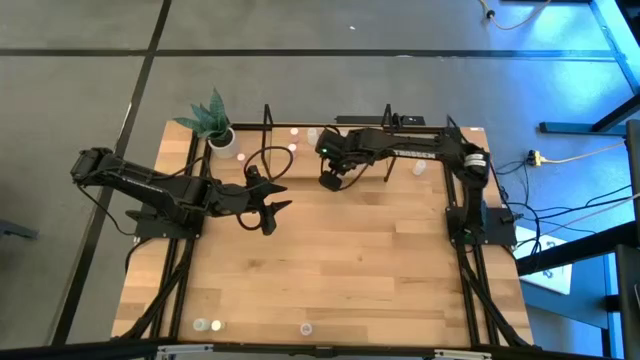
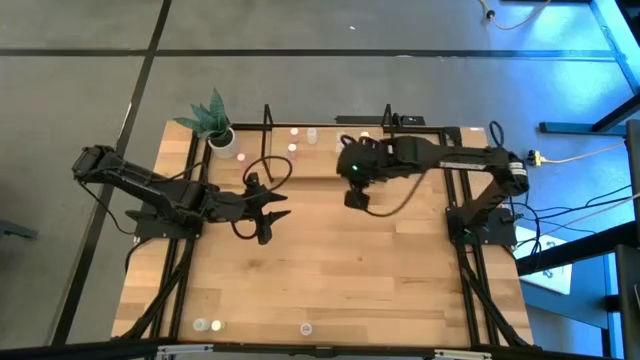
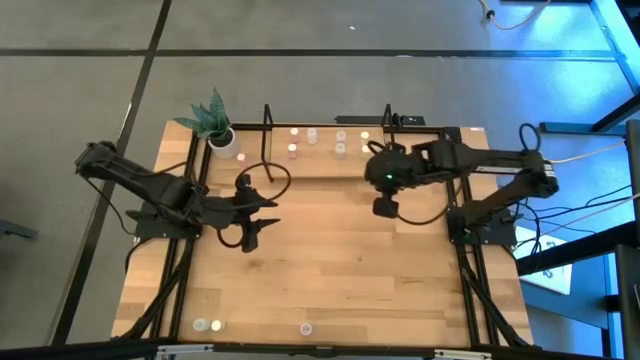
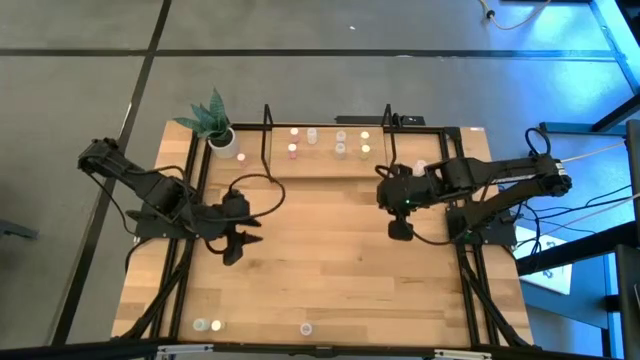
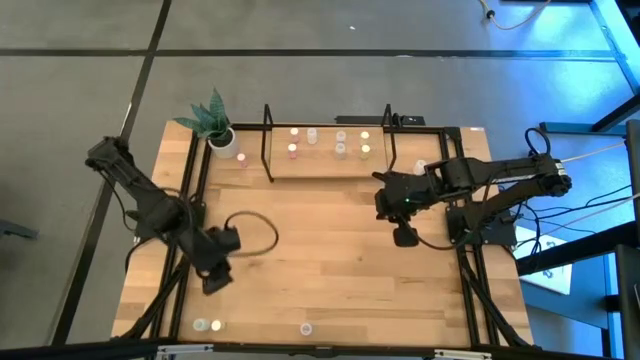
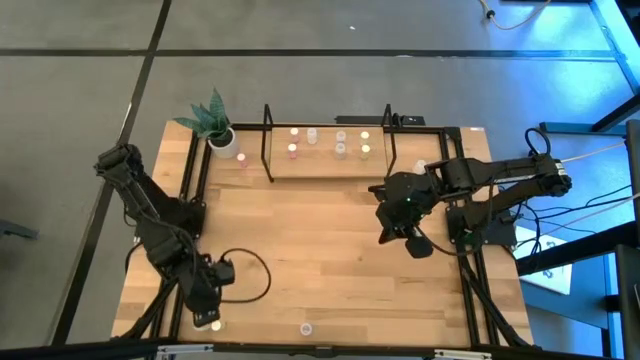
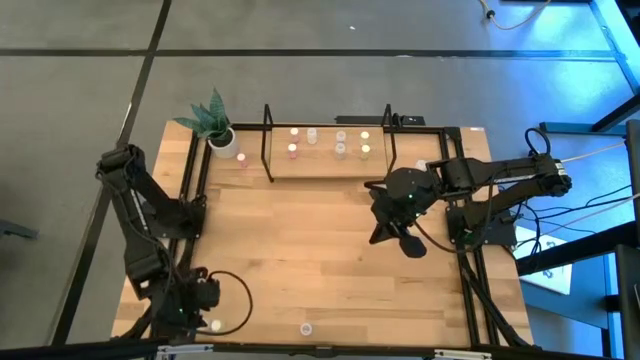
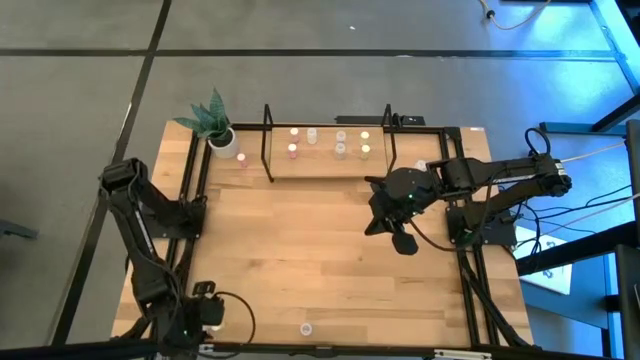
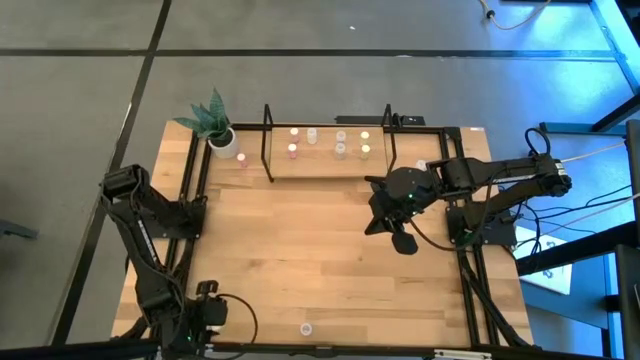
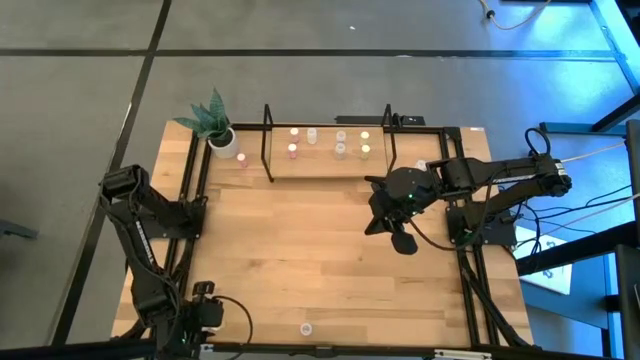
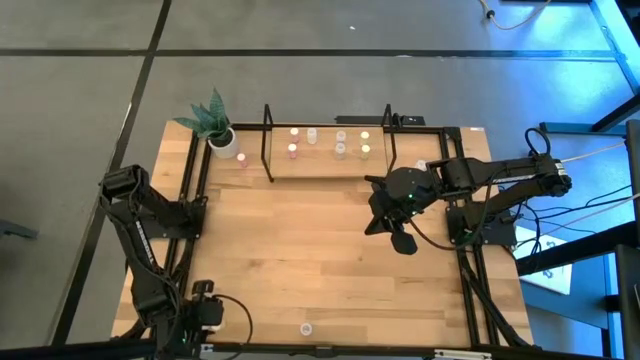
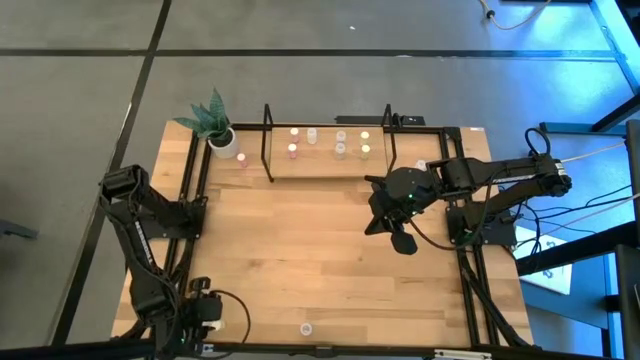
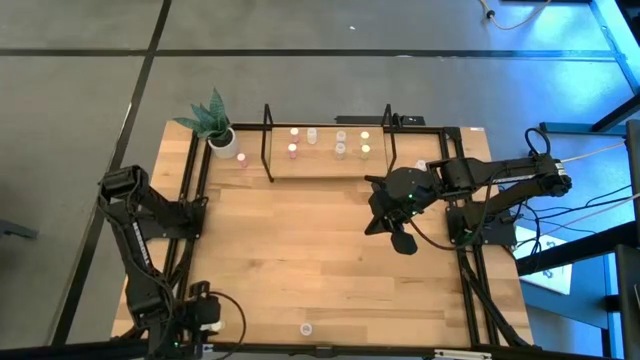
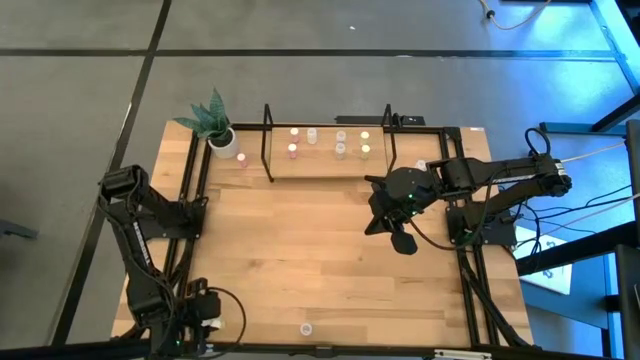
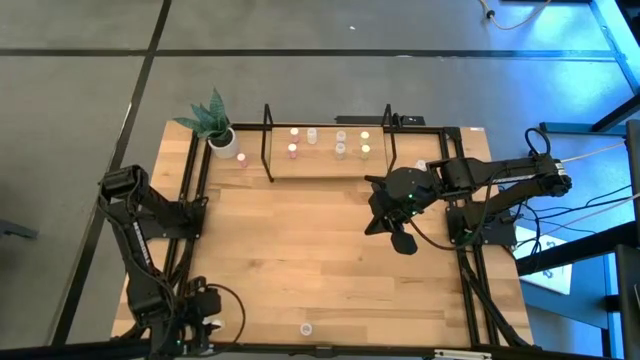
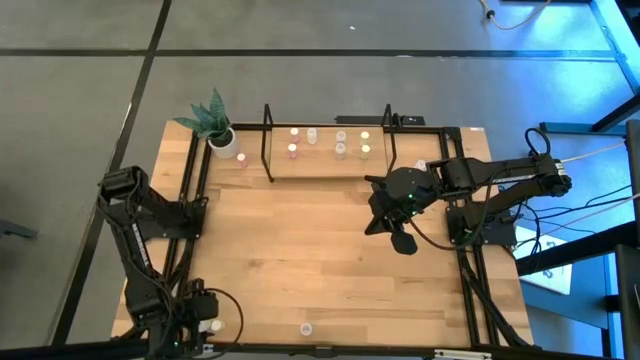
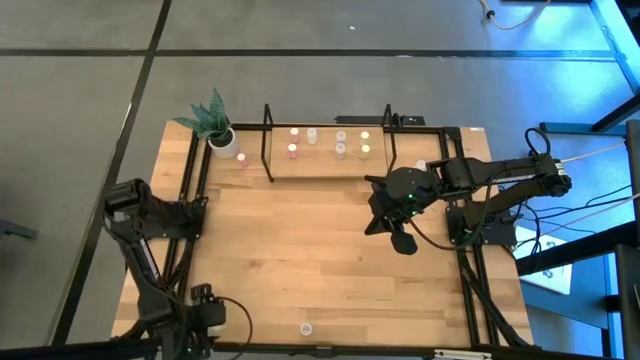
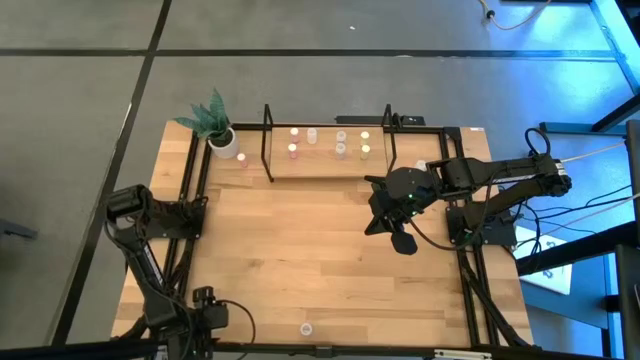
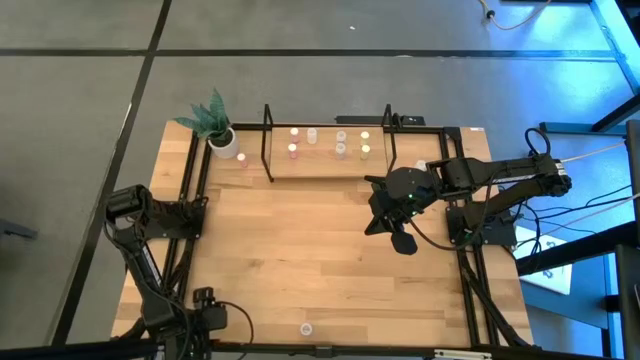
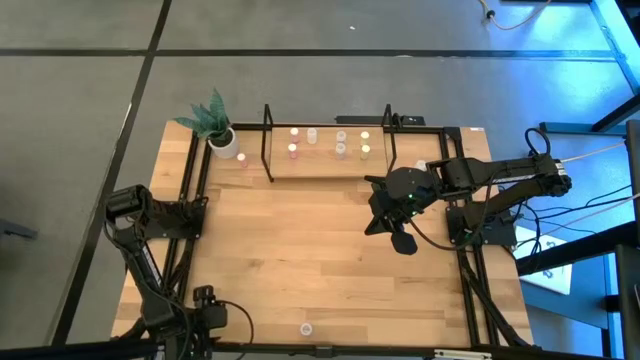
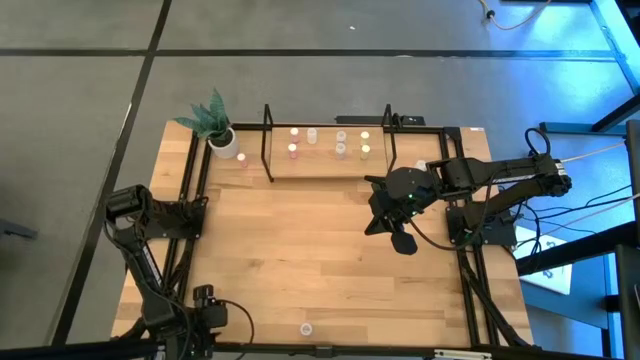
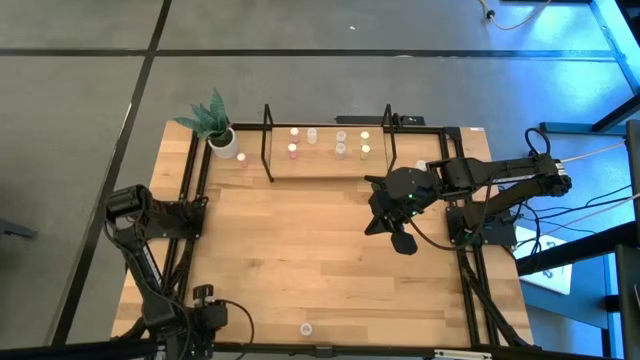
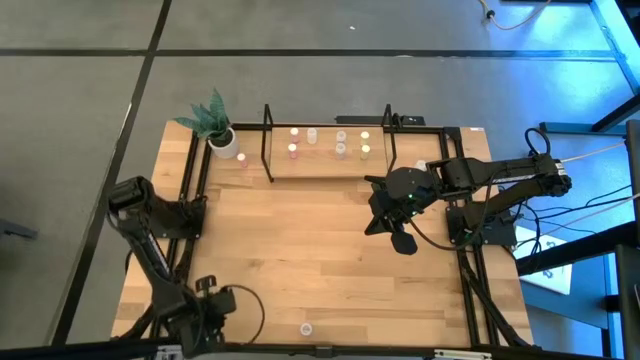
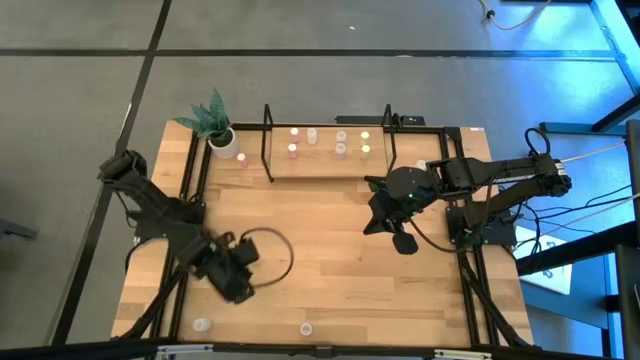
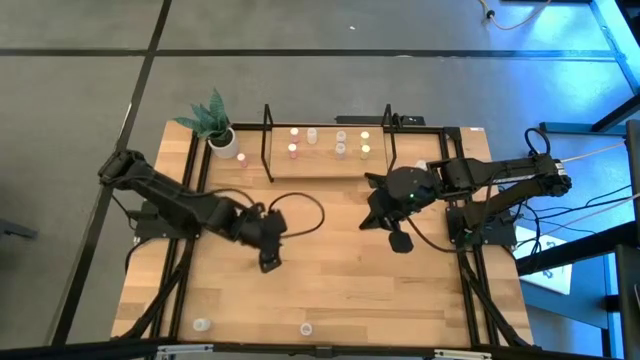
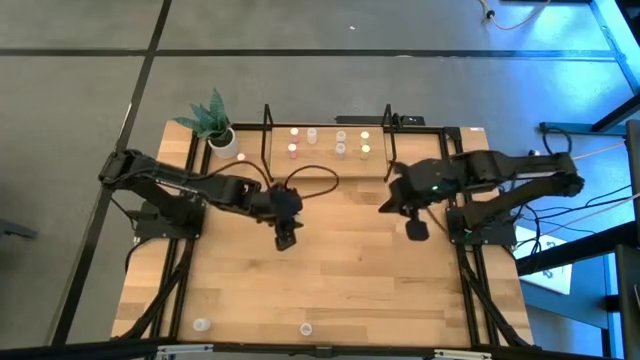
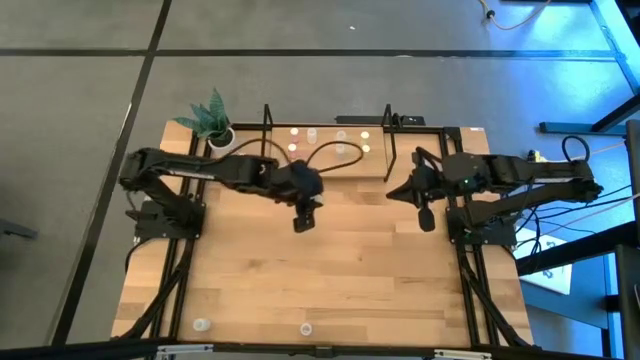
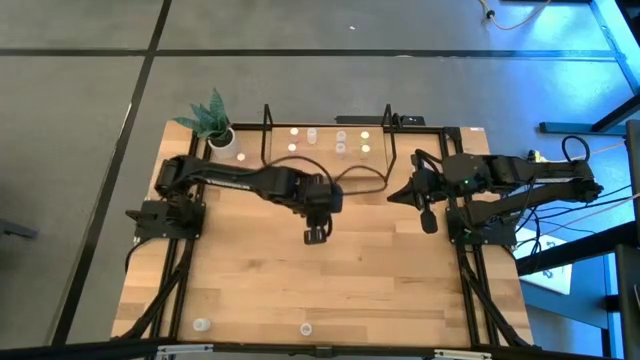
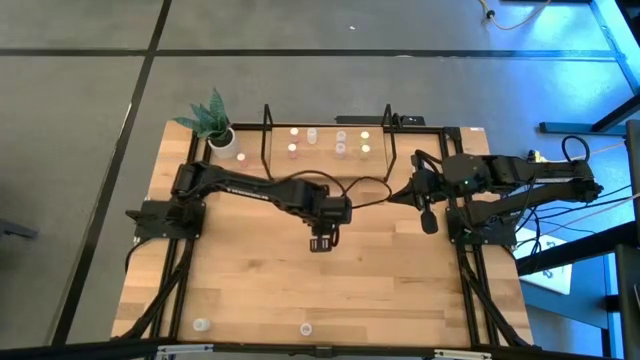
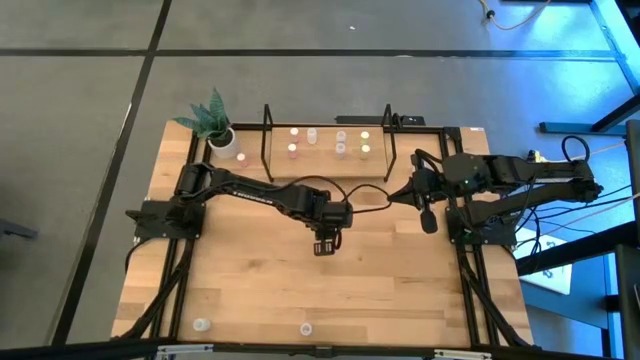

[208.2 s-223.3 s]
Task: Pick and place medicine bottles onto shelf by color
Put the yellow pill bottle on the shelf aligned with the other yellow pill bottles

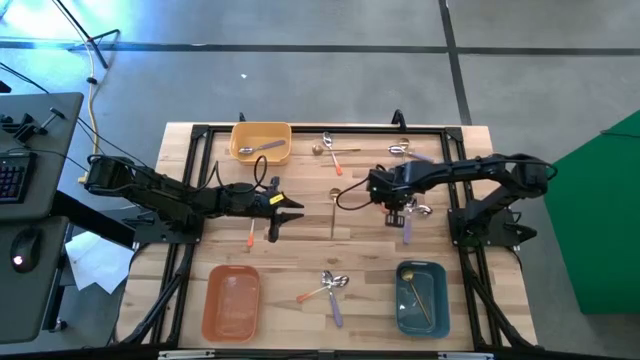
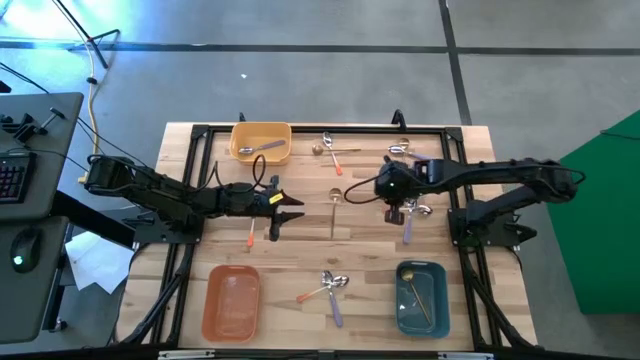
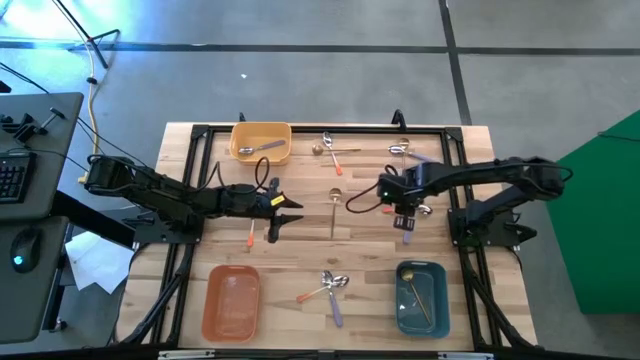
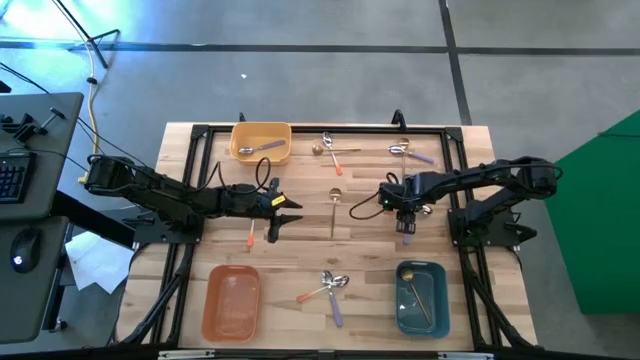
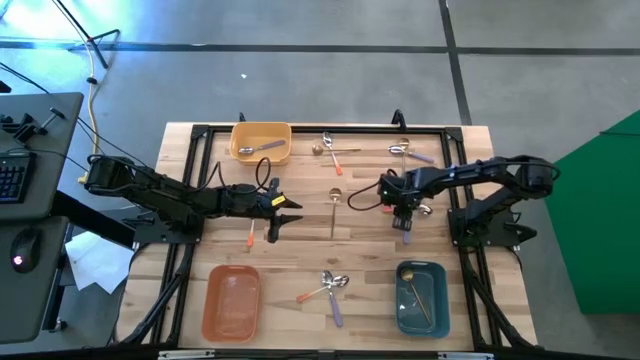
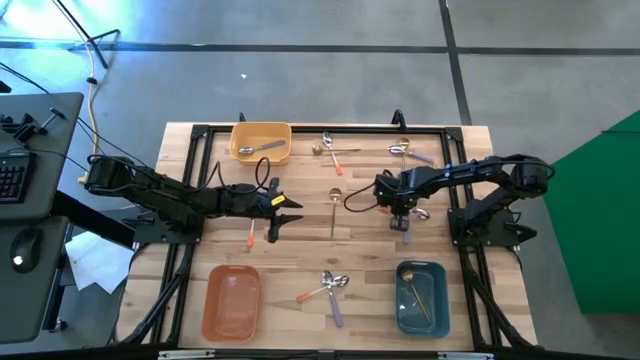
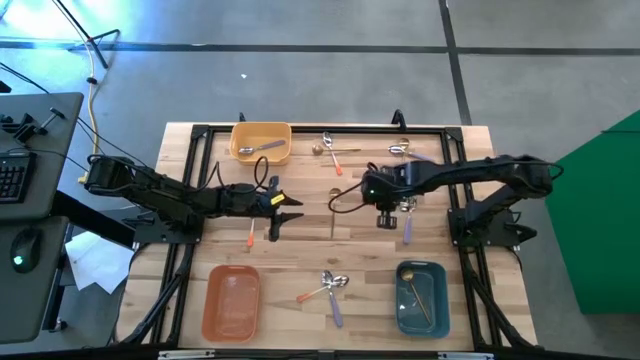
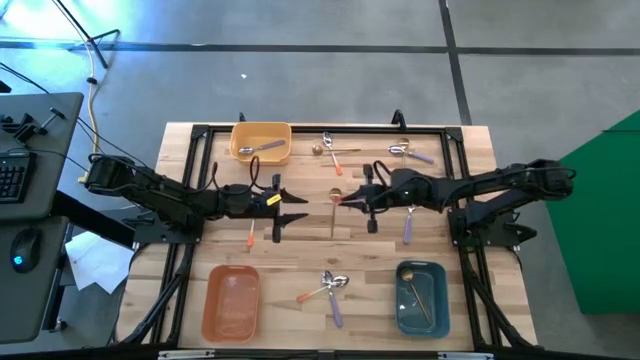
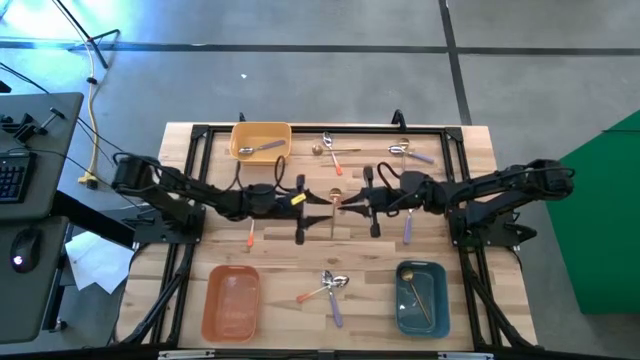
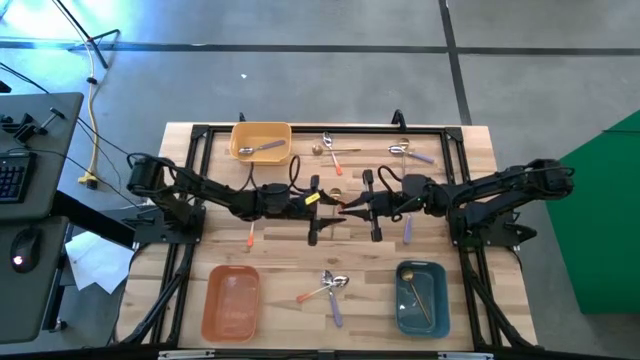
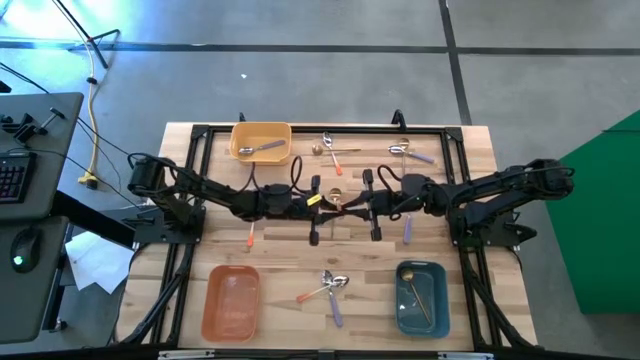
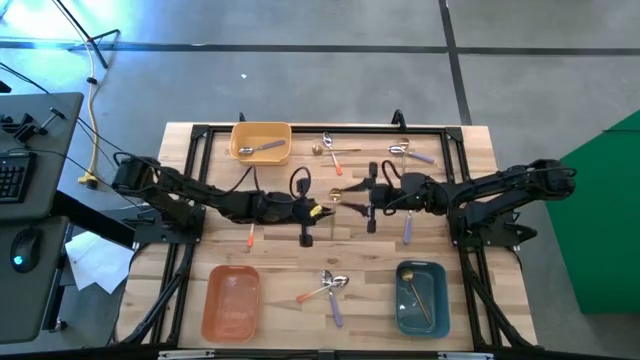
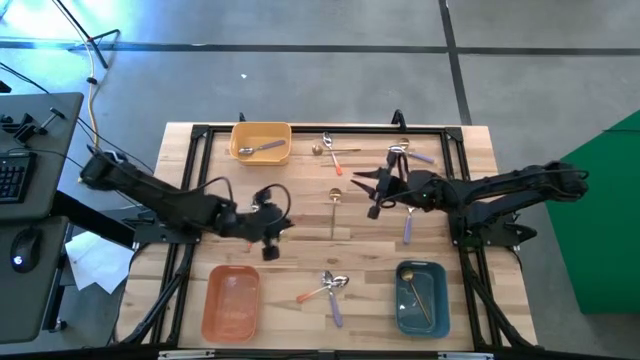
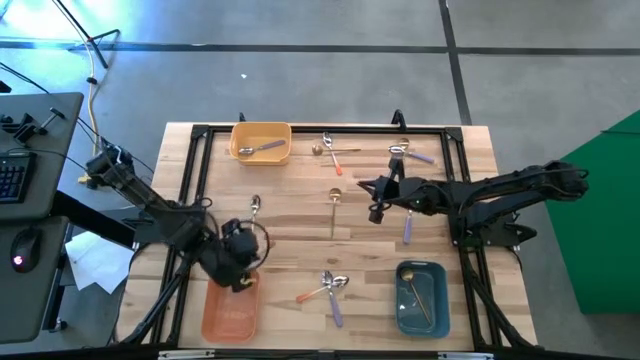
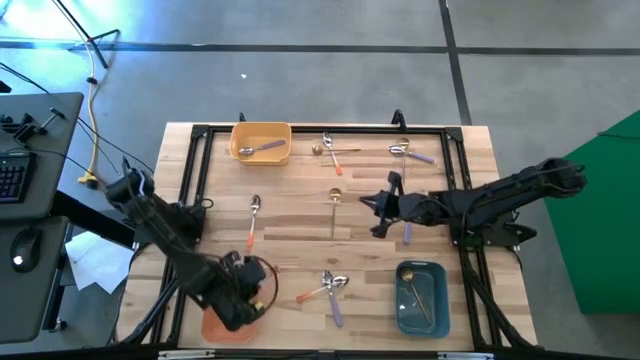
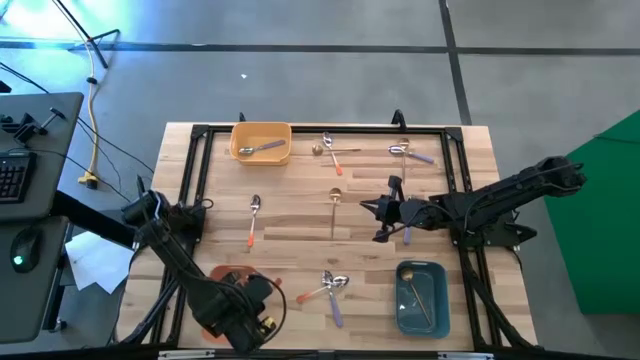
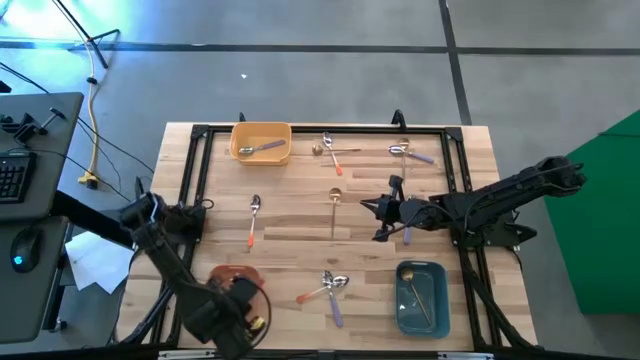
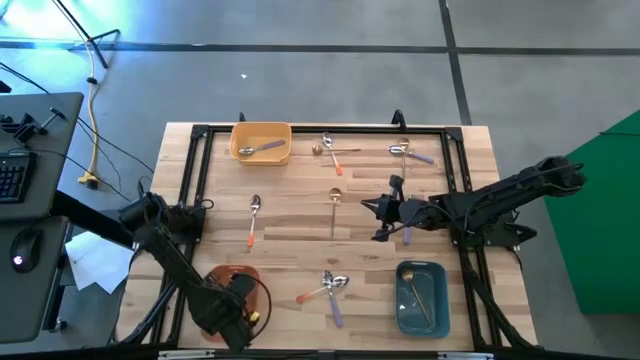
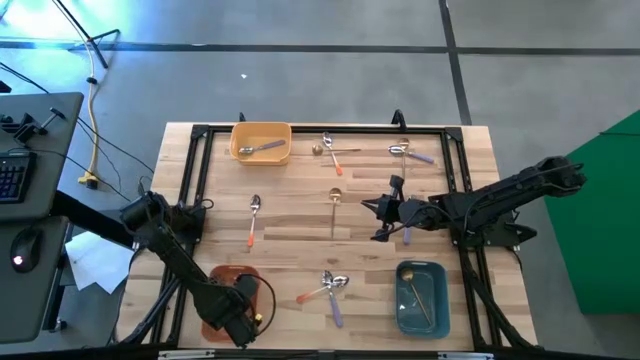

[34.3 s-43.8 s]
Task: Sort silverware by color (type)
Put the orange spoon into the orange bin
